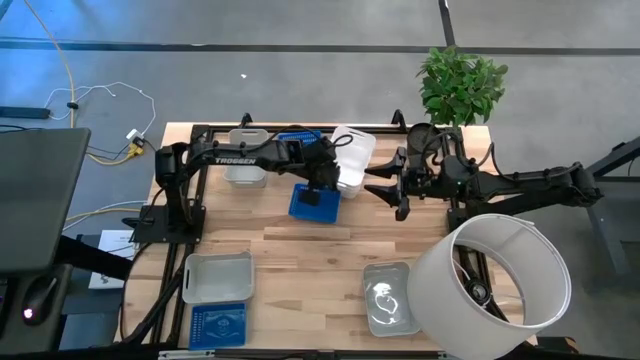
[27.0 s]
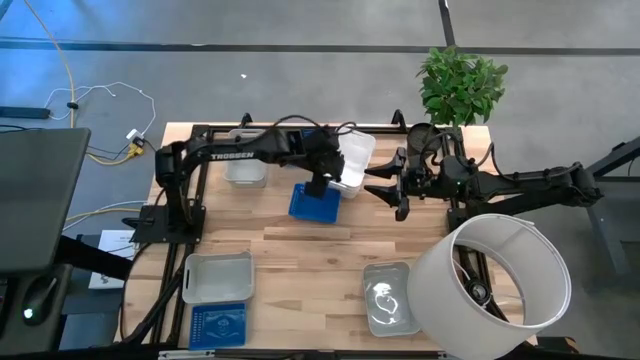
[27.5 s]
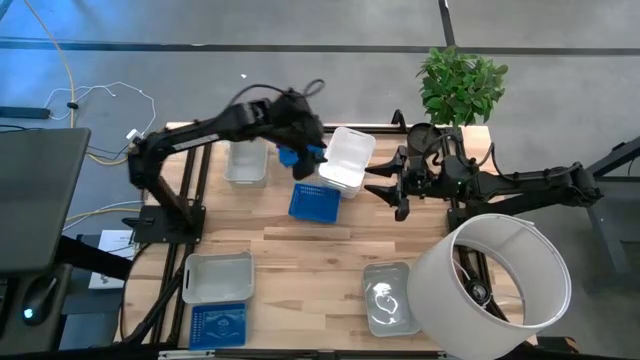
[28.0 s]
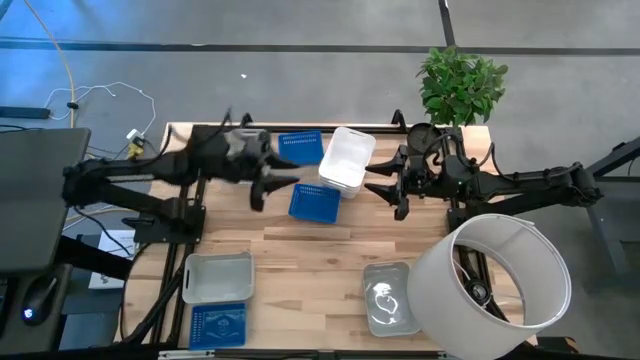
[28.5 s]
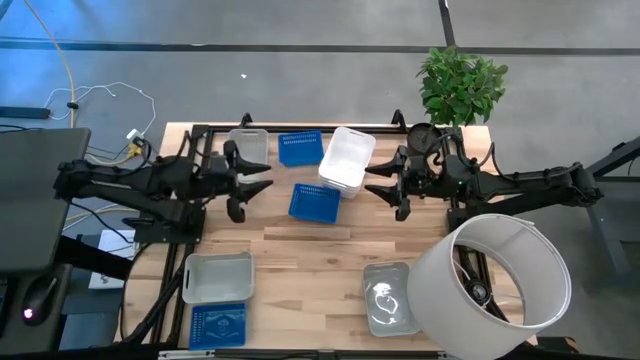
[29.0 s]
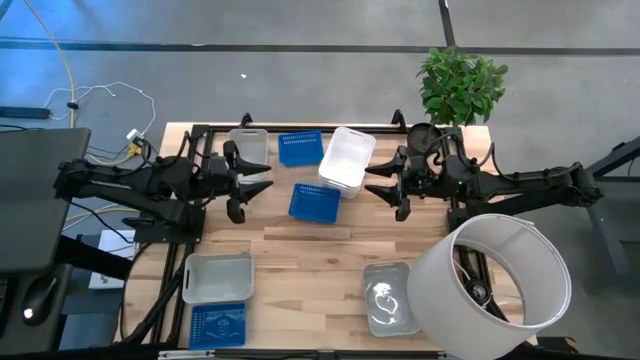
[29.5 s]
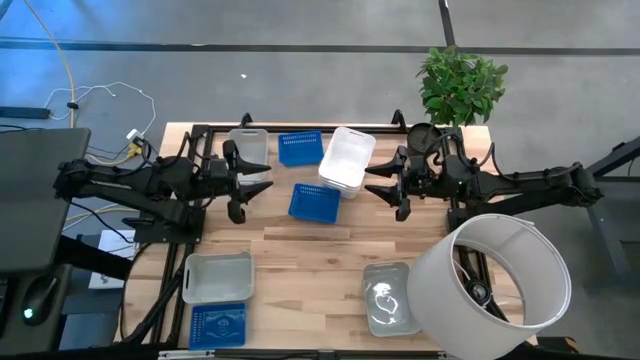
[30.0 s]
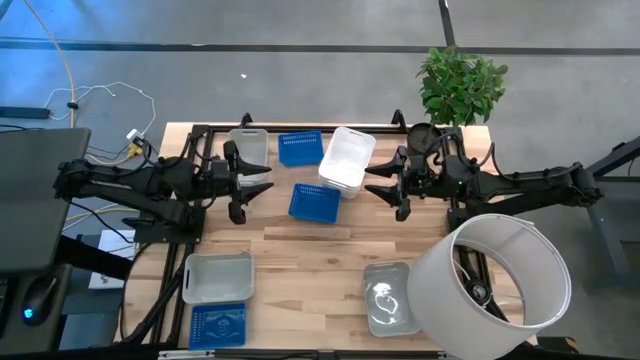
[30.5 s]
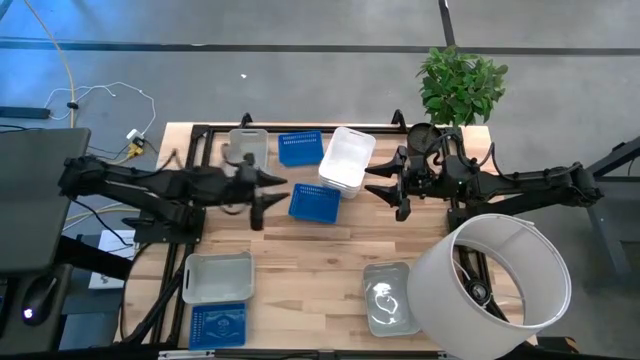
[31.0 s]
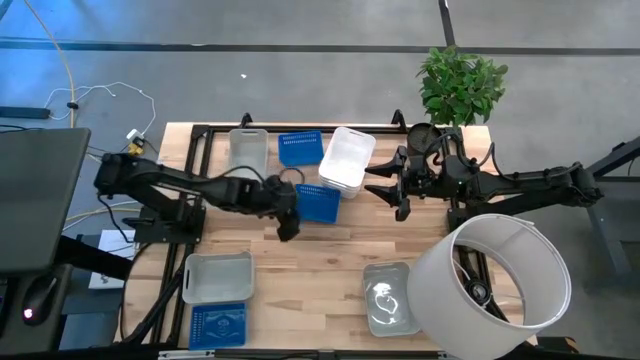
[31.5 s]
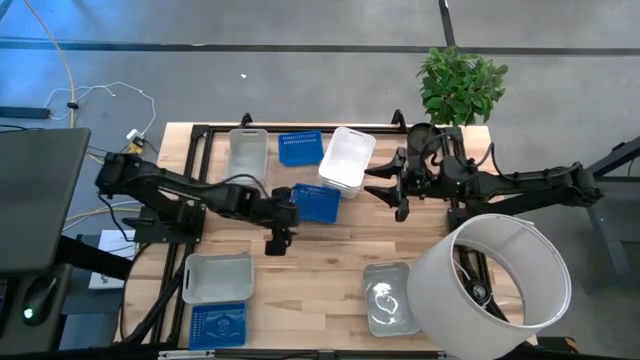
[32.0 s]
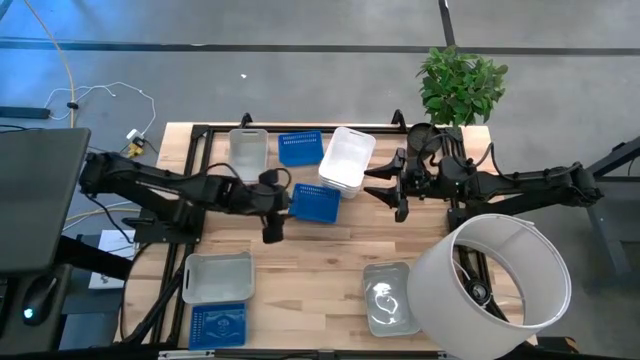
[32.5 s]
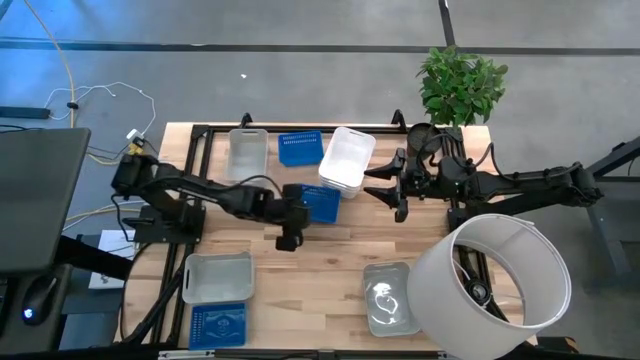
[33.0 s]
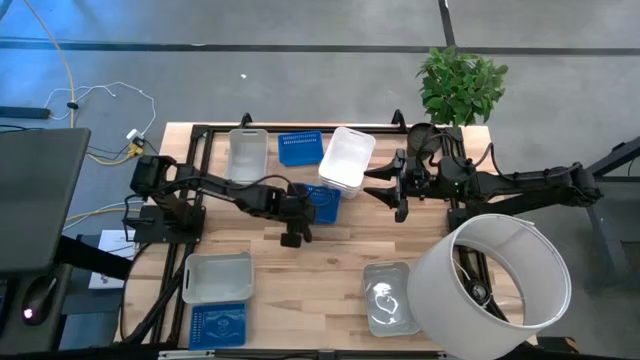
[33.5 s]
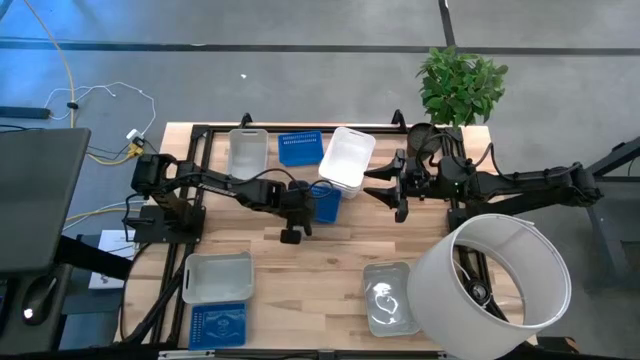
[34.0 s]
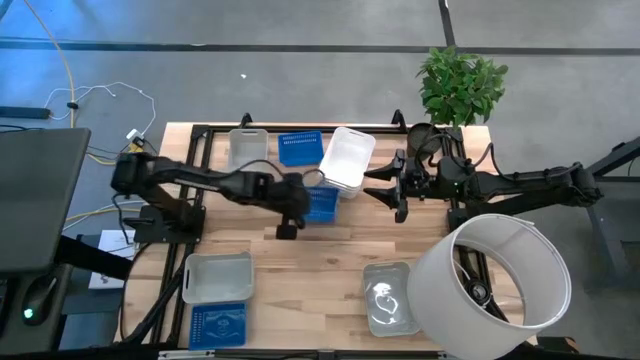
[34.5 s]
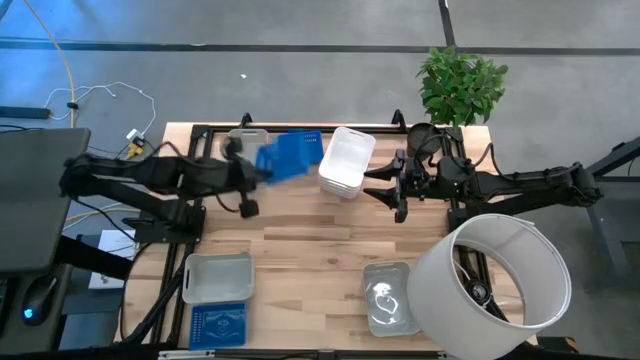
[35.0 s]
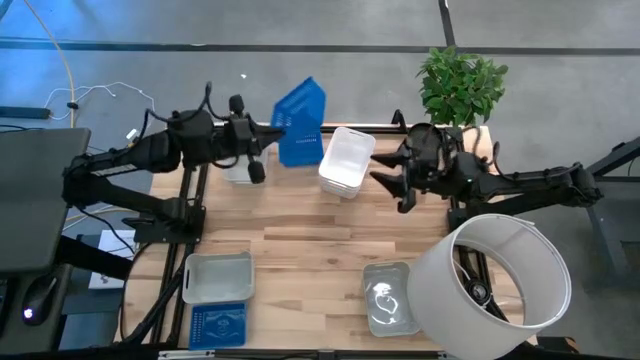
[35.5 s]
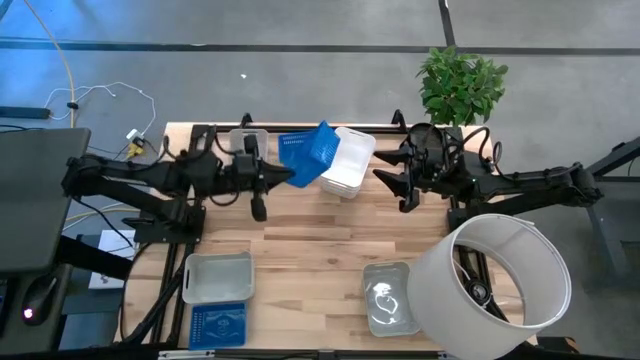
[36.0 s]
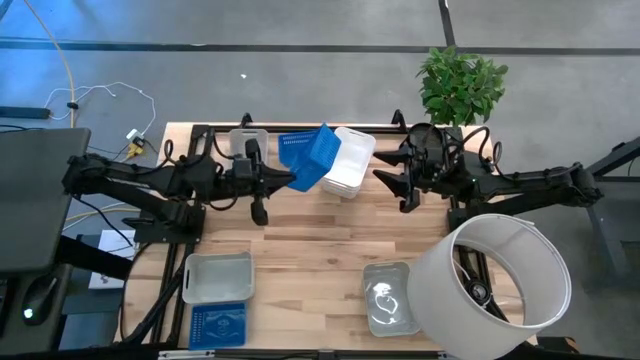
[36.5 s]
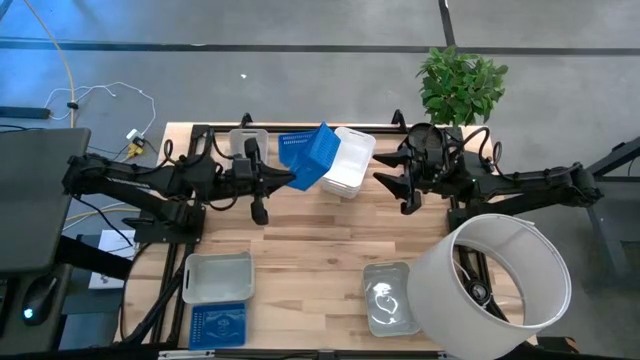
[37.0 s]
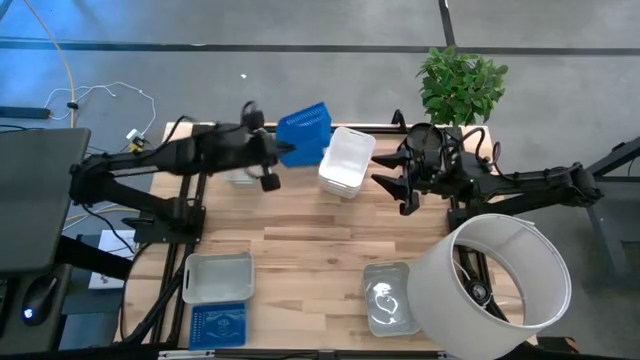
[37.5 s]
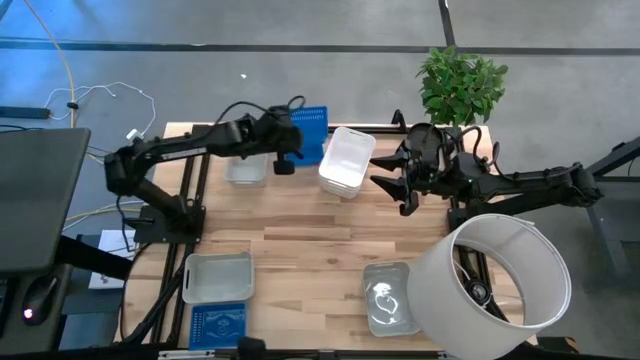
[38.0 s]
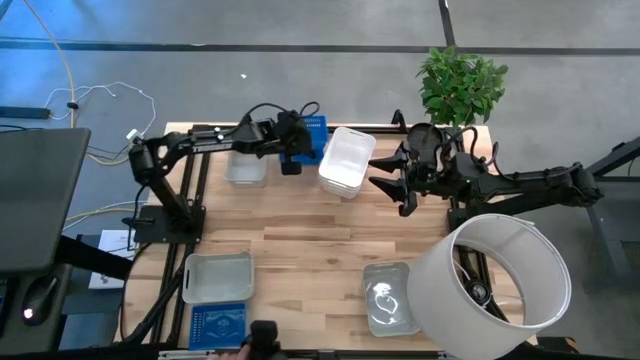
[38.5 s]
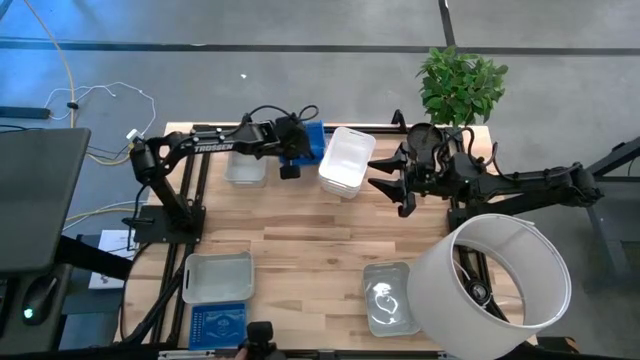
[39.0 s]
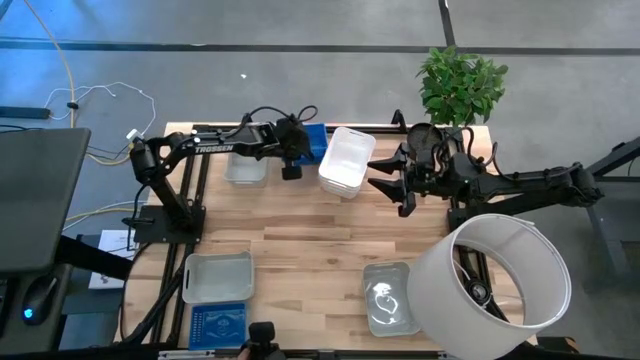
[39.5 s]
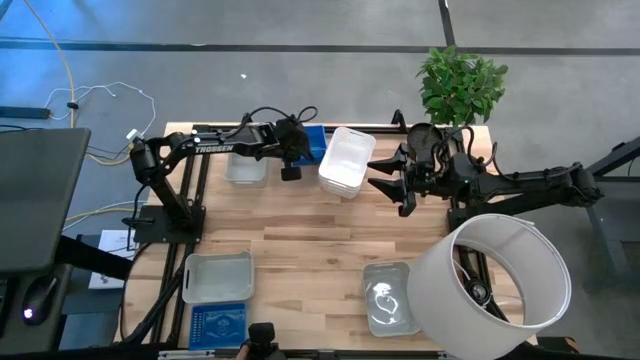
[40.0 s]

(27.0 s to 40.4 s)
Stack the middle blue bin on the top blue bin
